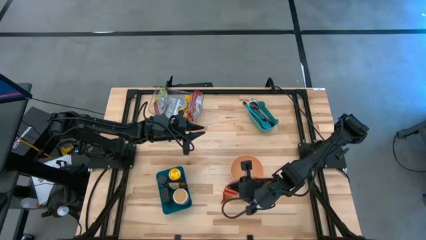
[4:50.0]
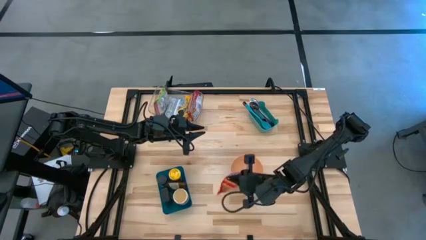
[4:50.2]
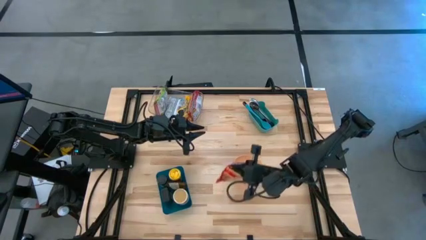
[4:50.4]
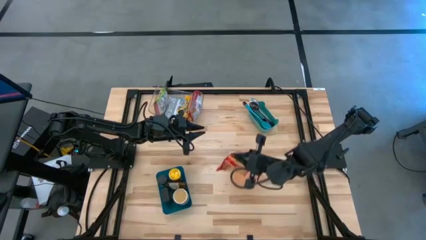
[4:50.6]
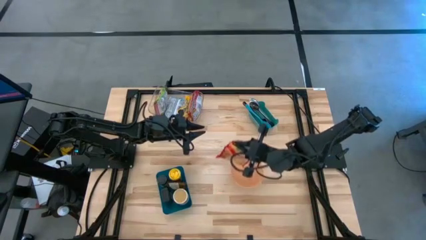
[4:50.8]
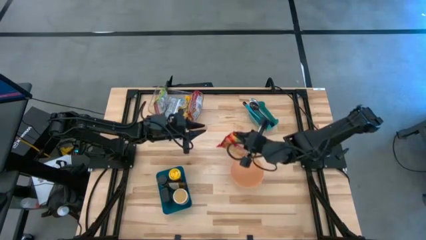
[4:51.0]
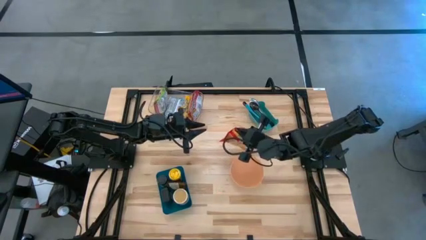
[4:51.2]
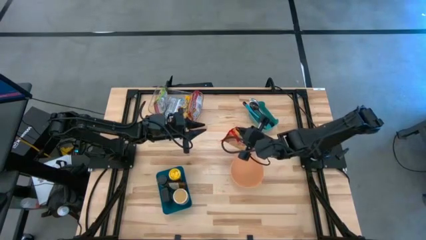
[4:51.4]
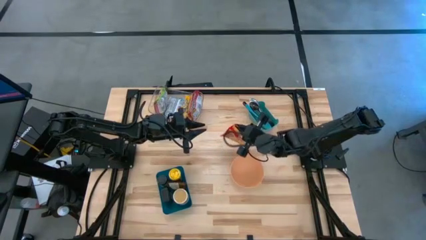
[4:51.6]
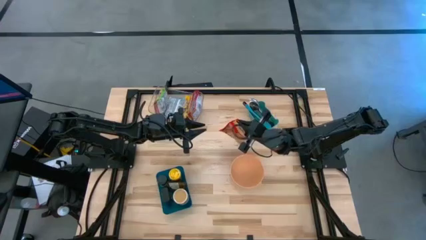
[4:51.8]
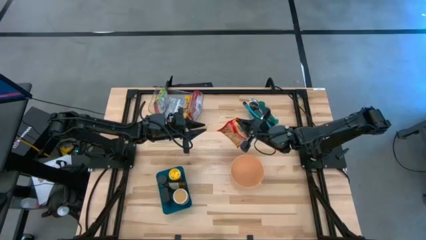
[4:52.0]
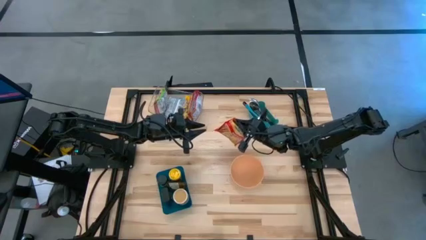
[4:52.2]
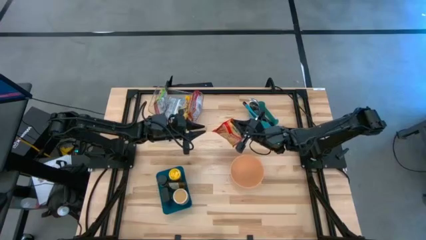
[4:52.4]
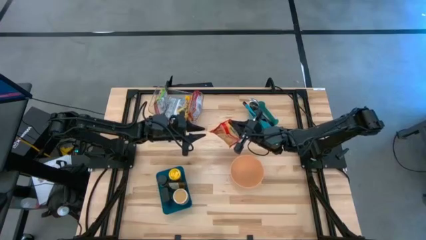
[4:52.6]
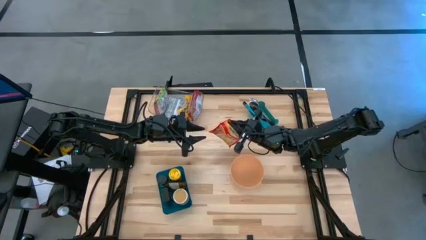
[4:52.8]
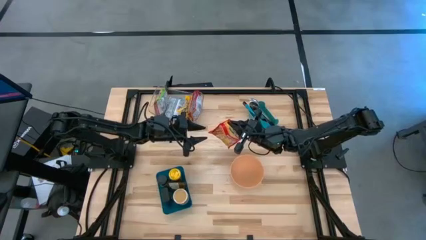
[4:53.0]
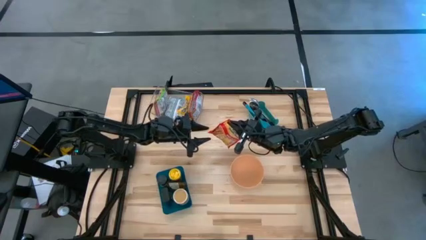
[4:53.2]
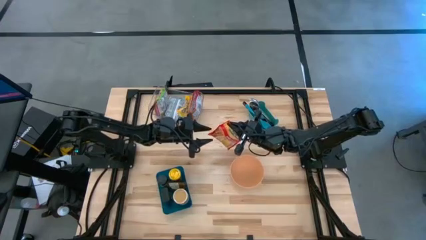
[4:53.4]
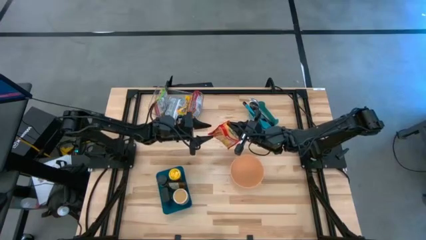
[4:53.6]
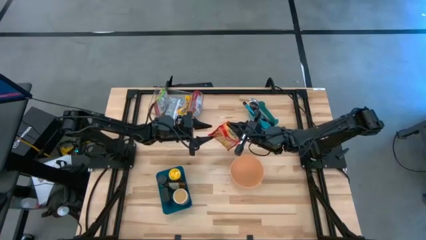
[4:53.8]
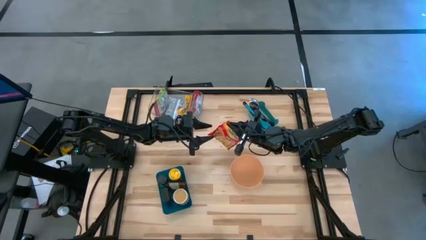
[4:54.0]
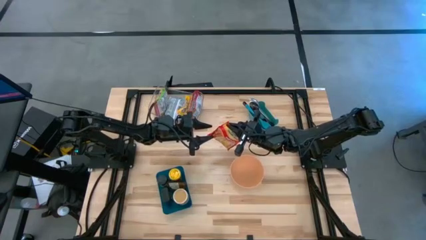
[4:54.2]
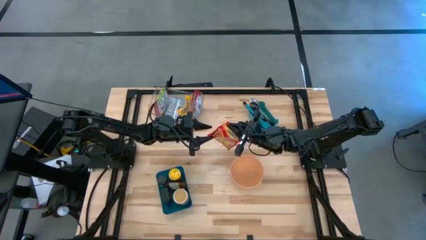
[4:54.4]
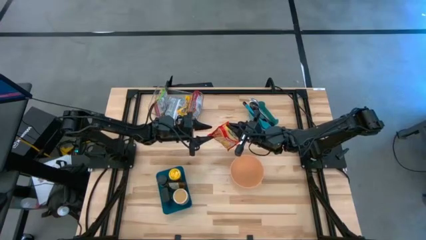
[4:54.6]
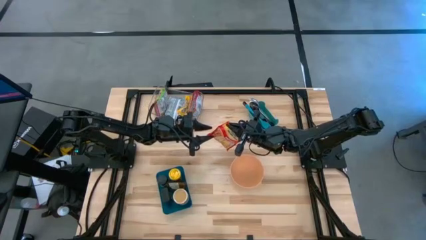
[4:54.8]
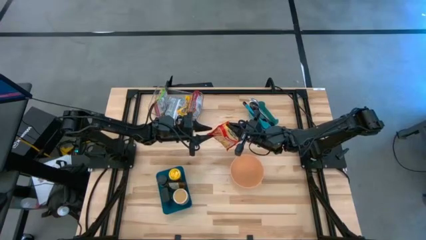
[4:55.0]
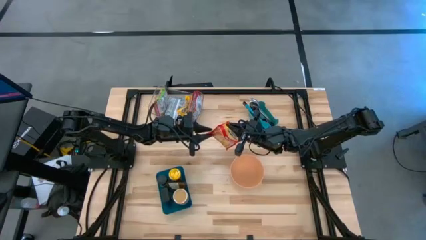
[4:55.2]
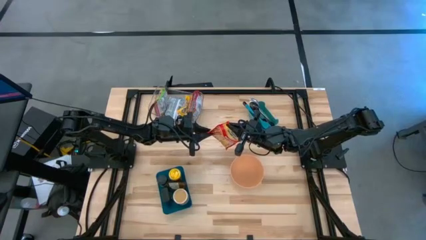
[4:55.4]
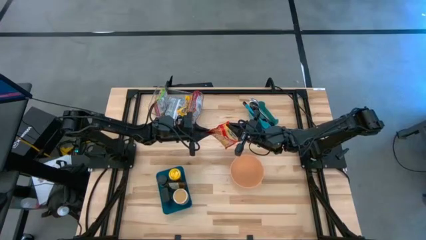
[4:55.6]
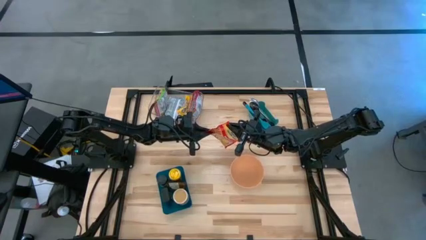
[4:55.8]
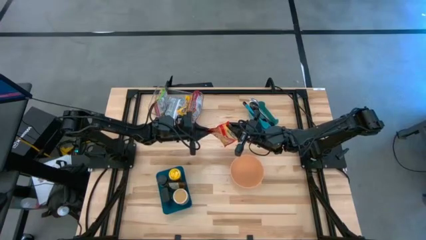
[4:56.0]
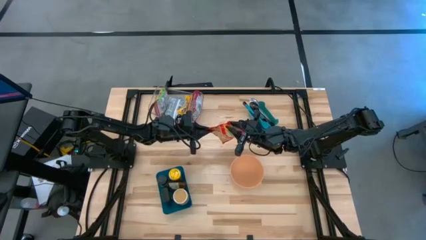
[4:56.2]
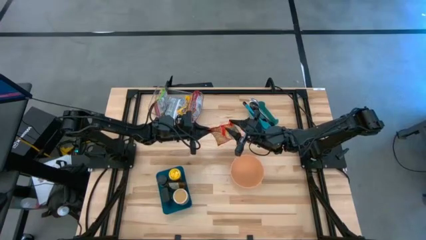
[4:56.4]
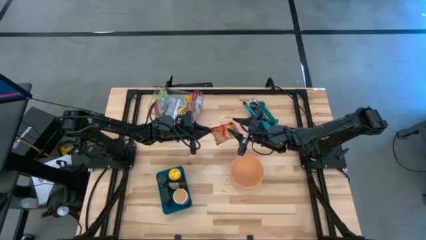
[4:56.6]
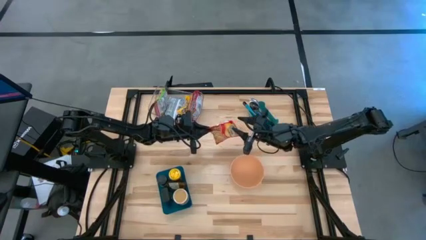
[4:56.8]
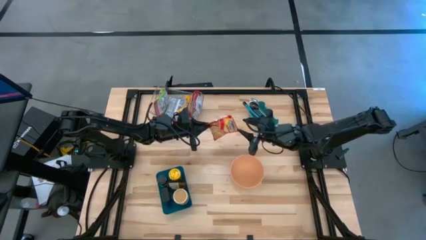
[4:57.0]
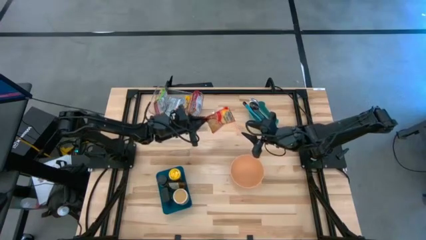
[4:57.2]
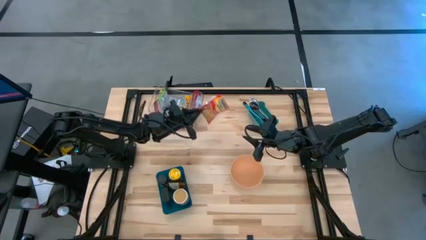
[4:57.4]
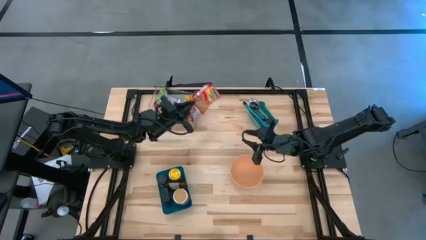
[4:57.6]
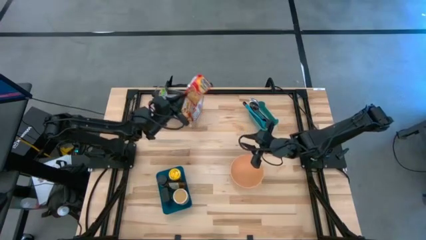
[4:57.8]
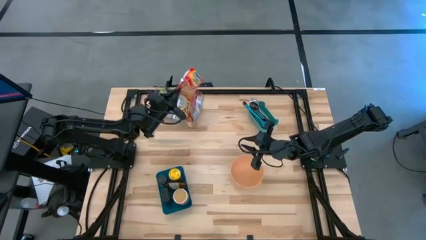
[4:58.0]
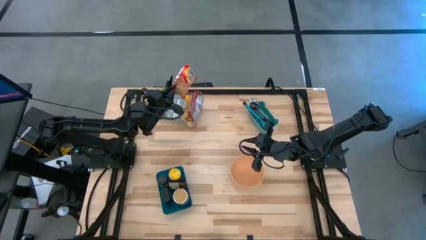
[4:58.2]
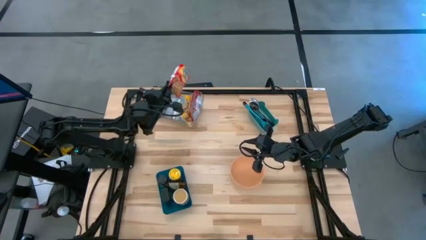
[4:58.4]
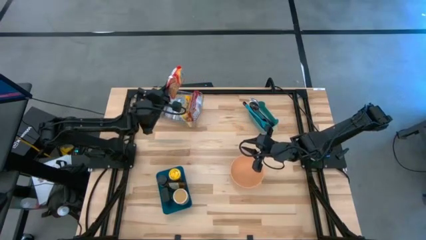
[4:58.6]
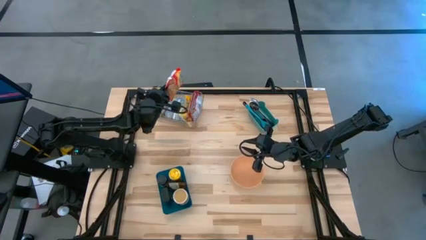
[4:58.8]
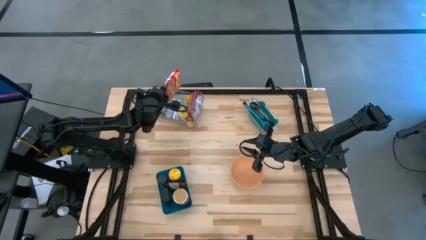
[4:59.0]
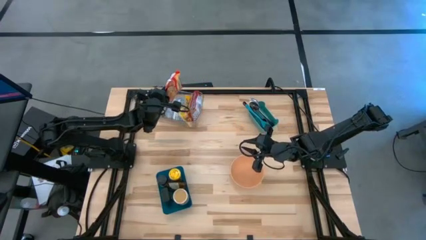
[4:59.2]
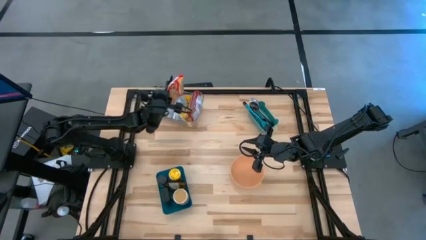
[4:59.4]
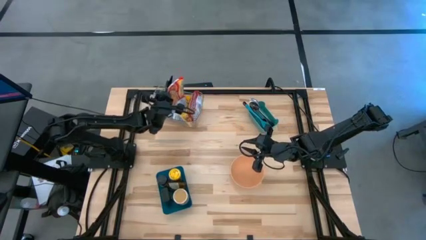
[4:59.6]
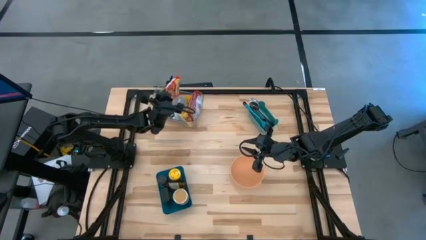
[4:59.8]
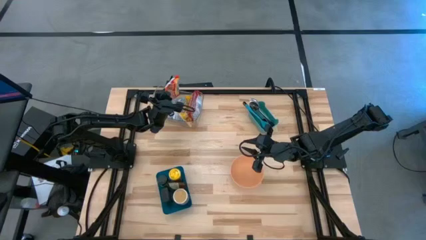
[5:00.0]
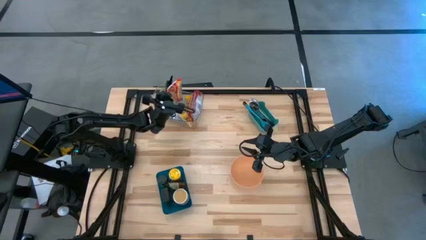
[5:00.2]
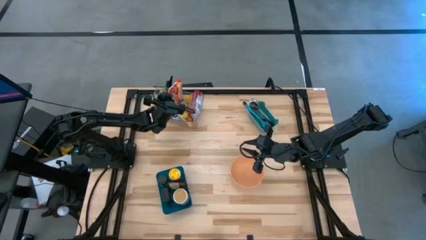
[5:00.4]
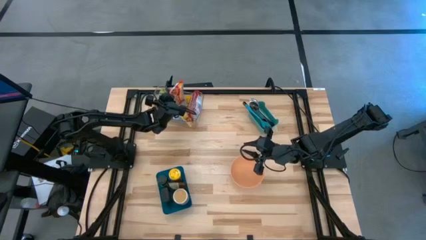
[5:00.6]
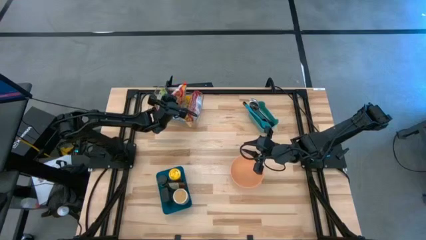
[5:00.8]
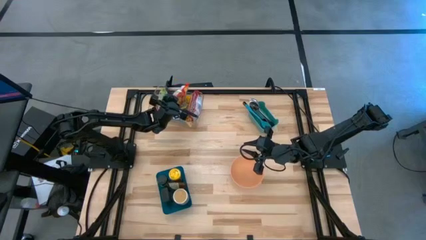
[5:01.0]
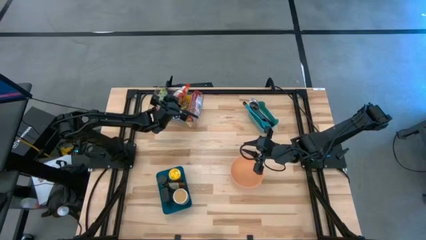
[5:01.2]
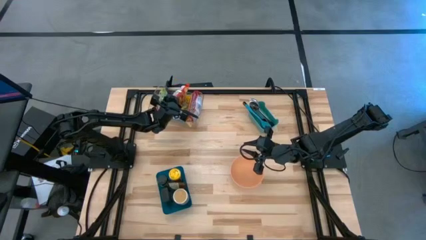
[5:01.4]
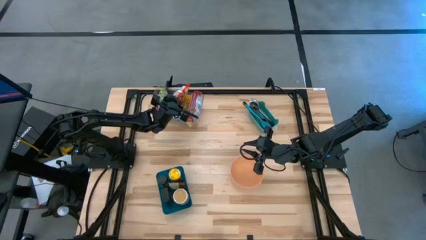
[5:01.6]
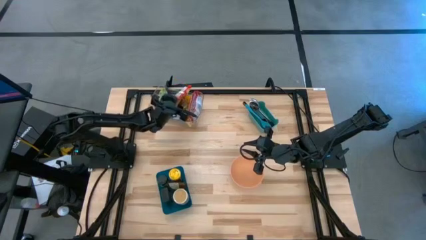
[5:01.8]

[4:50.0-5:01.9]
Task: Pick & Place Food Item
Put the red noodle pack into the transparent bin

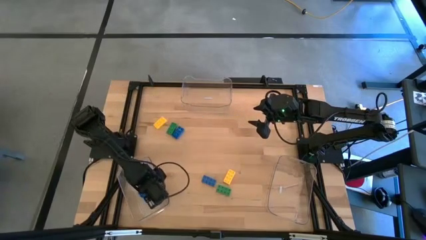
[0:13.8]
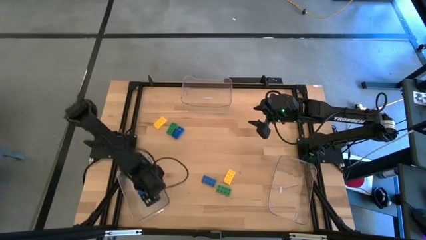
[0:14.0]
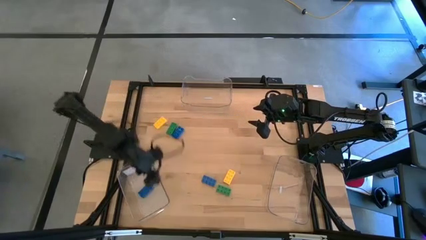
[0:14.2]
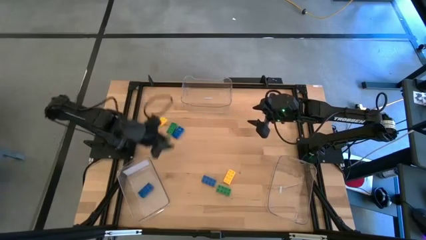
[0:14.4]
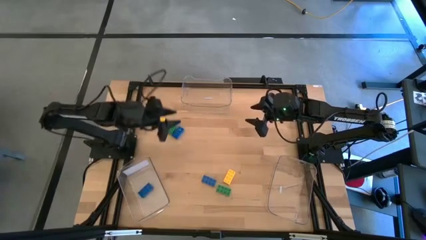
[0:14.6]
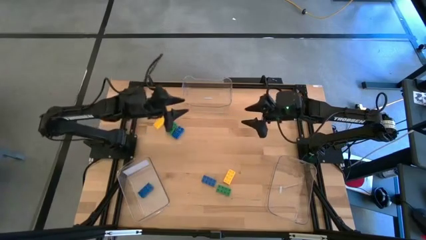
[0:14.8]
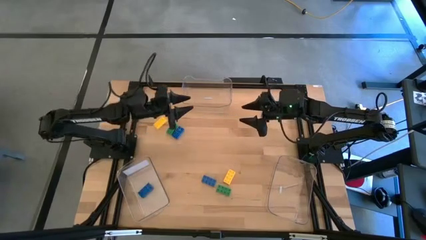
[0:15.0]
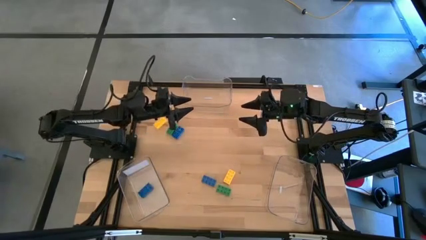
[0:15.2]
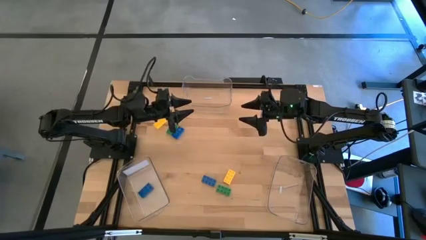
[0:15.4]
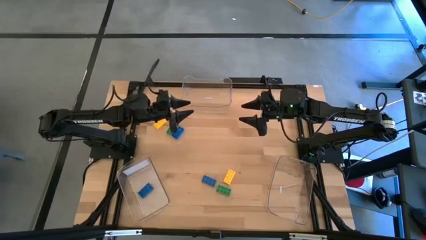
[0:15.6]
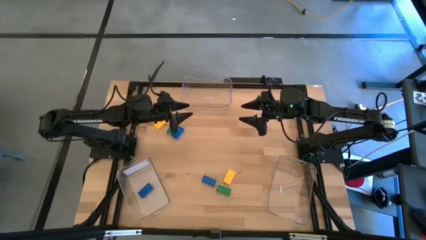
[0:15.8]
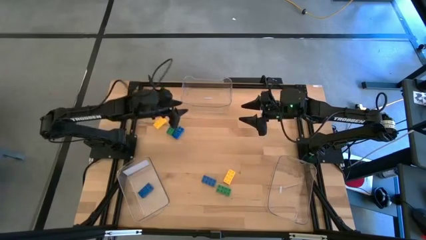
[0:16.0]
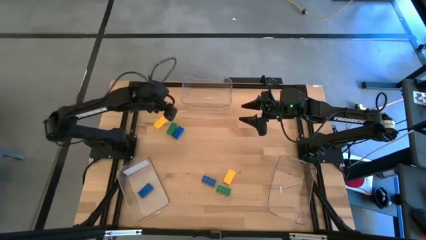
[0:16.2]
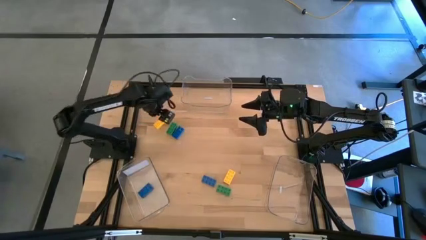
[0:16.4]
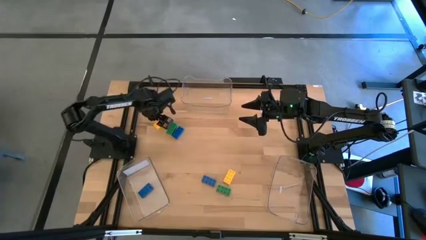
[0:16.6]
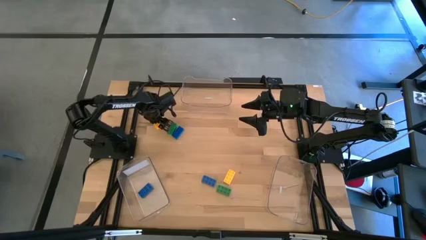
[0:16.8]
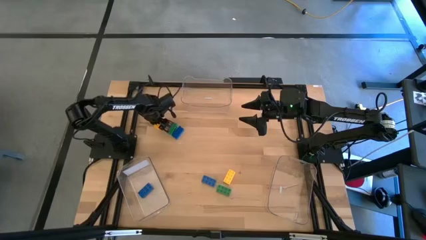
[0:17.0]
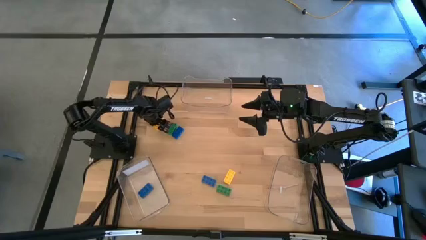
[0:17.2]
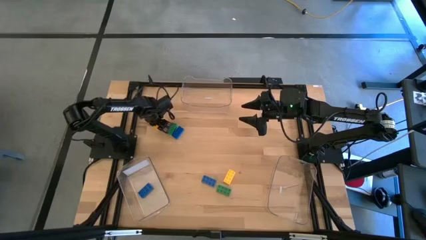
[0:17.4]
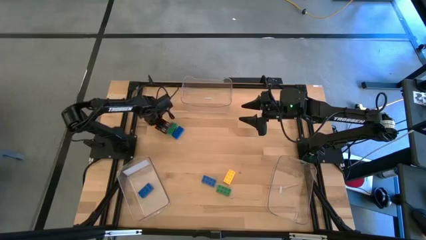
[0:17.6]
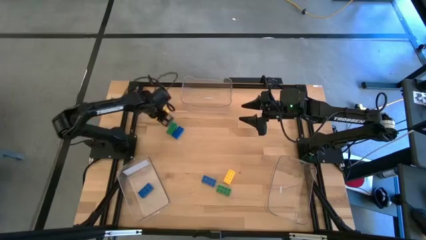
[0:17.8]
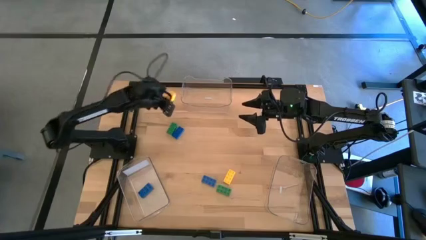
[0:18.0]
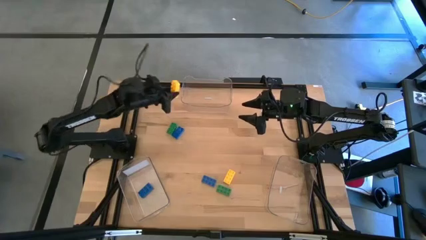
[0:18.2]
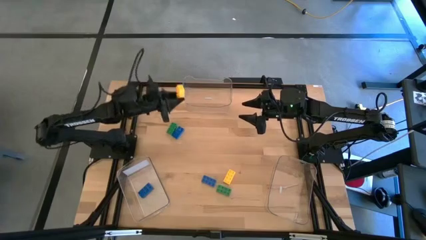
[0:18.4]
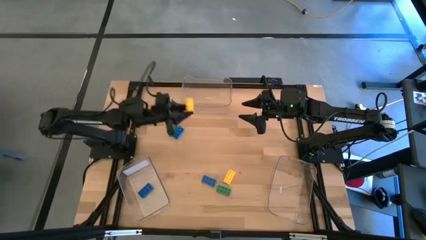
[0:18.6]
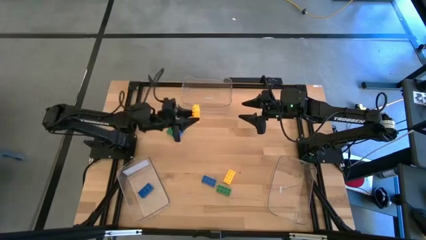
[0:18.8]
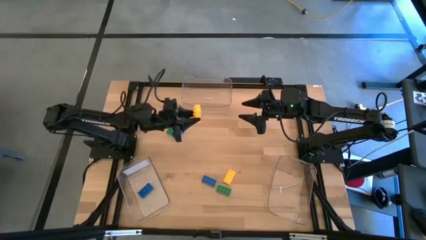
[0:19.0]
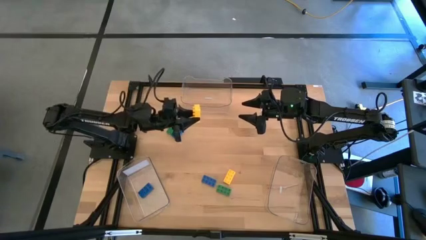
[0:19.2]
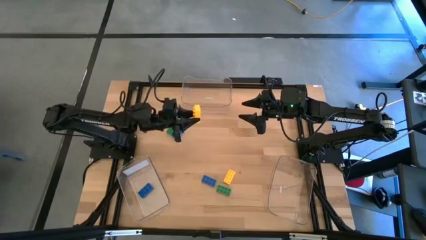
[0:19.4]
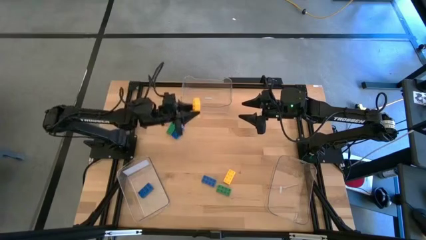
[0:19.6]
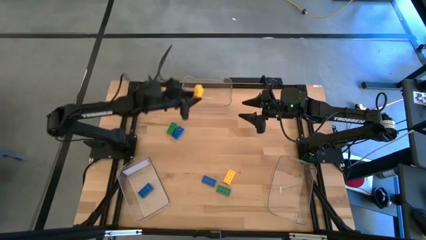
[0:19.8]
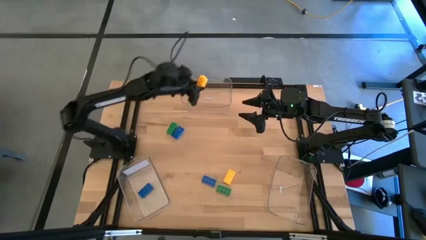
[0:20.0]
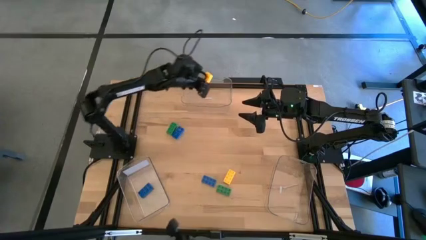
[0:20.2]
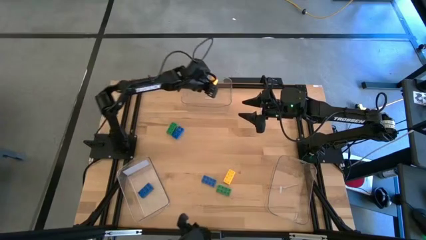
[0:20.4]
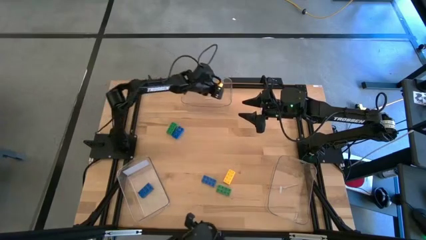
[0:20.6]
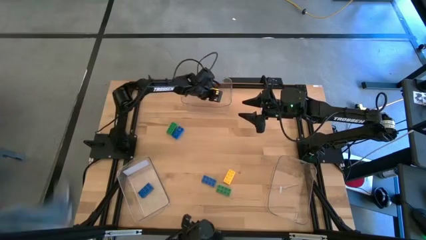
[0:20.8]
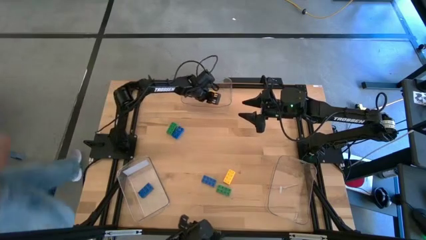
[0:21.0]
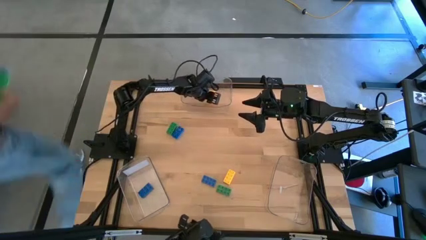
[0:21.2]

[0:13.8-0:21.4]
Task: Sort & place blocks by color
Put the top left yellow game piece into the top transparent bin
